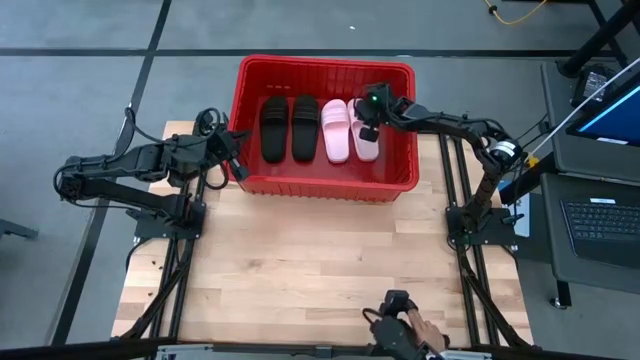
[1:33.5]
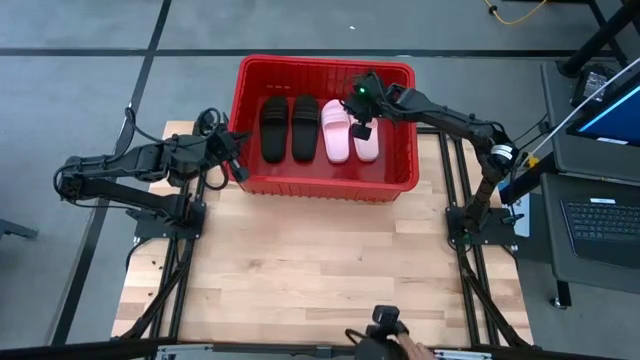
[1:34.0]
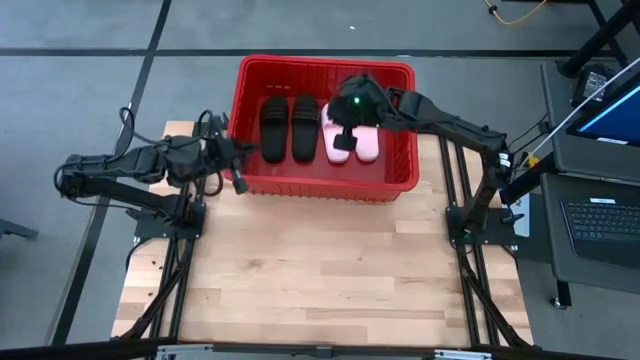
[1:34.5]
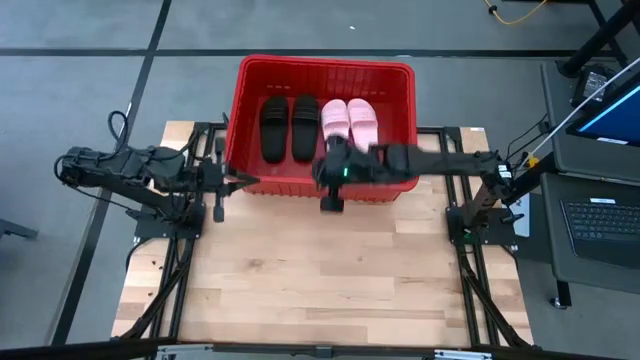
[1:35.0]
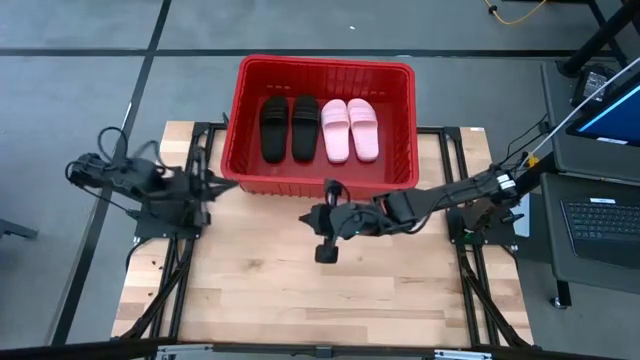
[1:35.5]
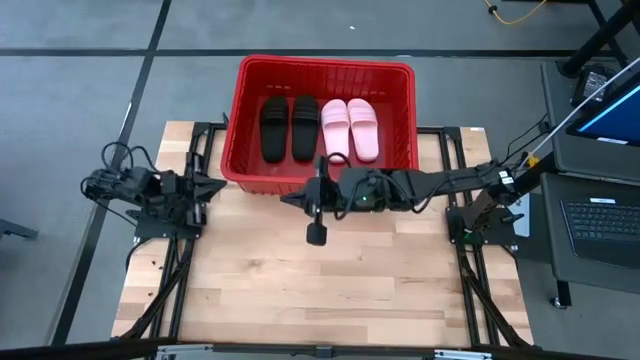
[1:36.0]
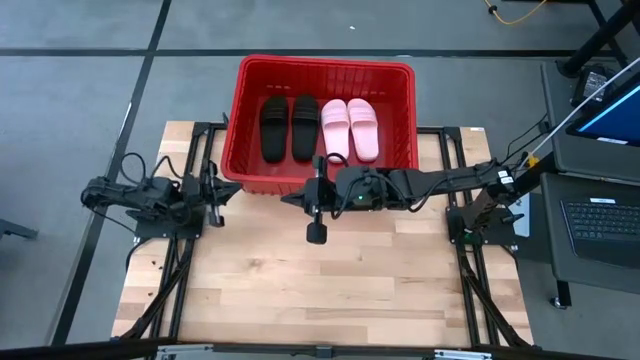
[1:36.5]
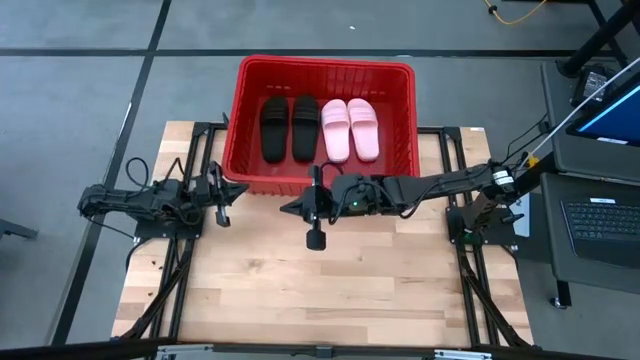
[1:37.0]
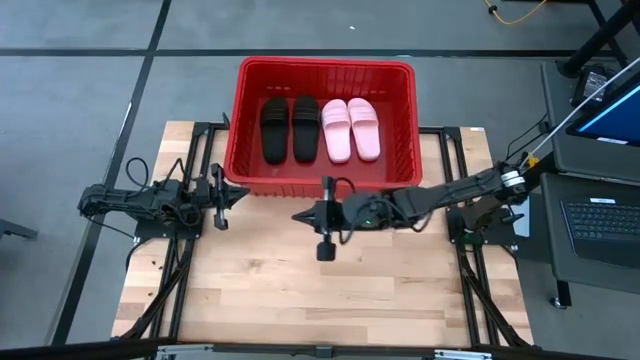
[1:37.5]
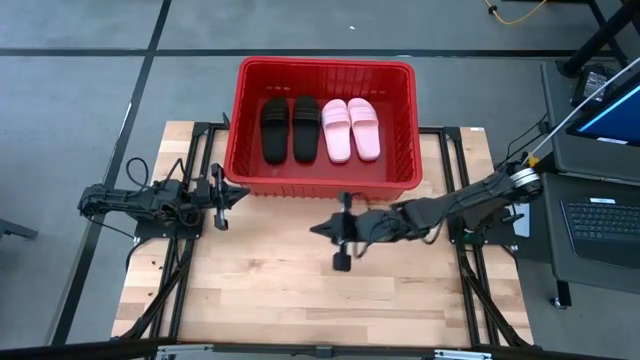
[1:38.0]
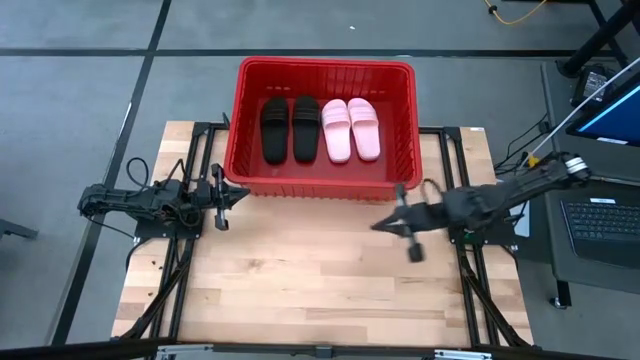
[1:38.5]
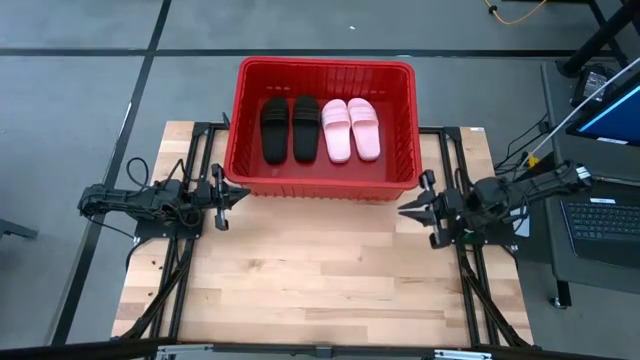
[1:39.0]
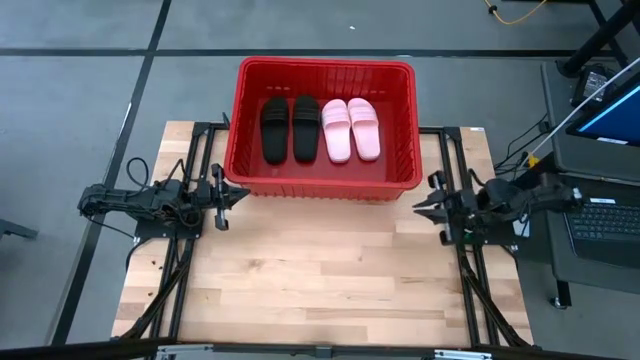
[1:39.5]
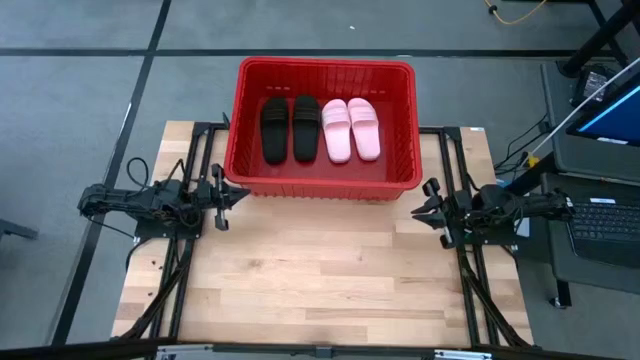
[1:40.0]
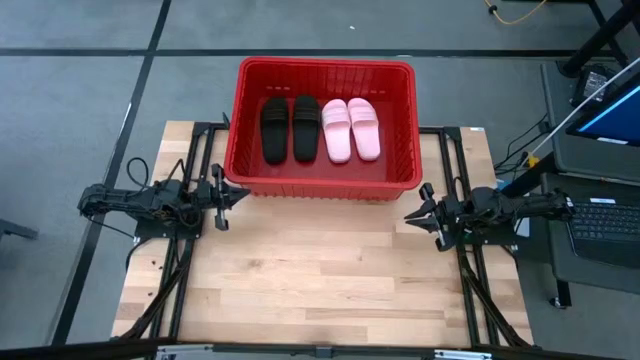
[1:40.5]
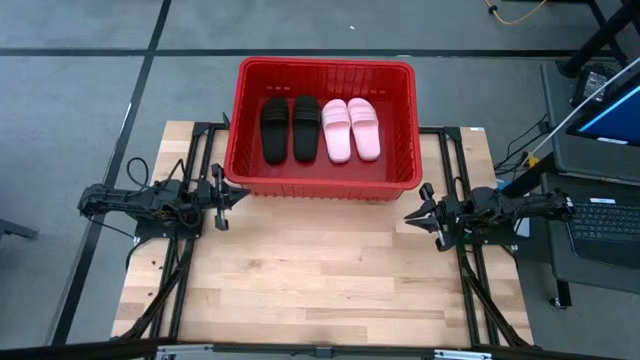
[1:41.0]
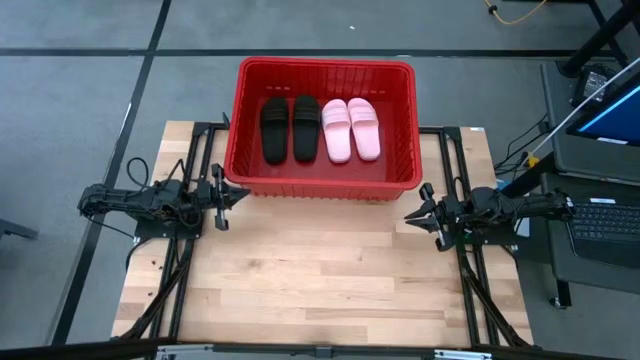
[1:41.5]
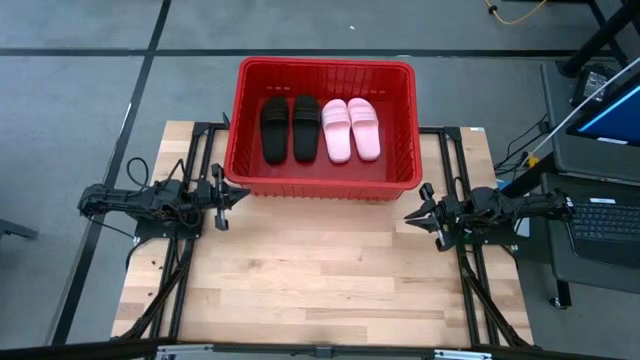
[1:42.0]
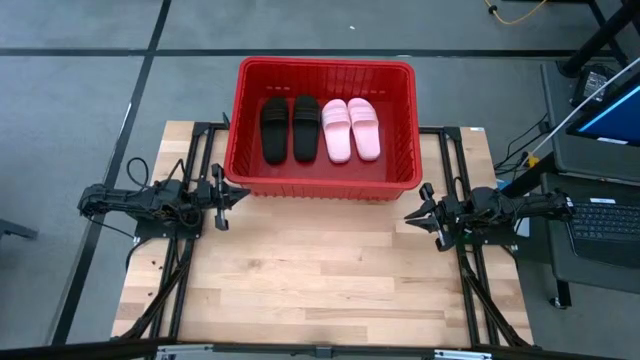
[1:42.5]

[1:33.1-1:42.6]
Task: Pick and place slides into bin
Return to Home Position

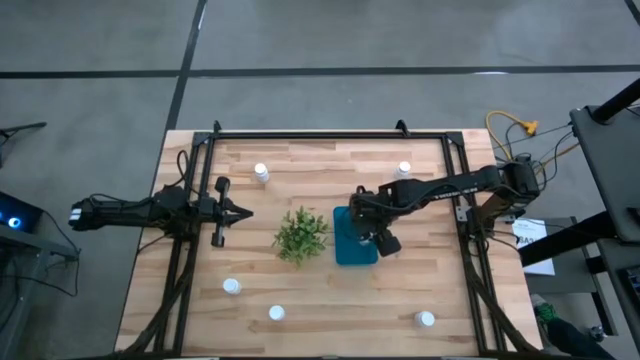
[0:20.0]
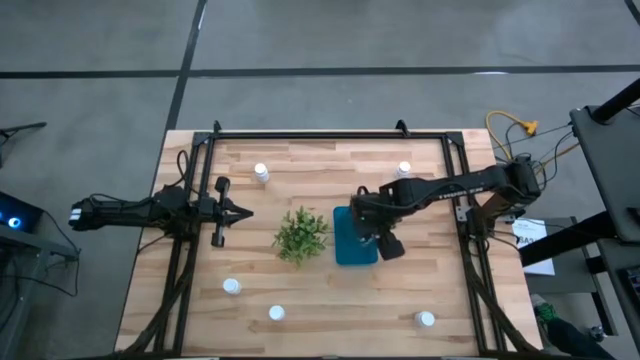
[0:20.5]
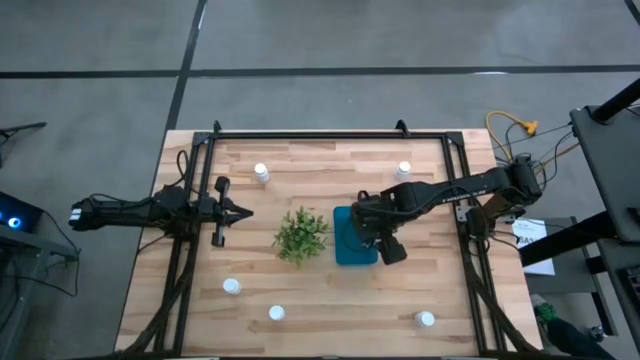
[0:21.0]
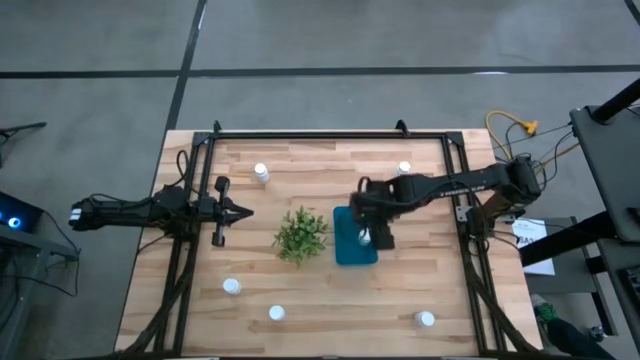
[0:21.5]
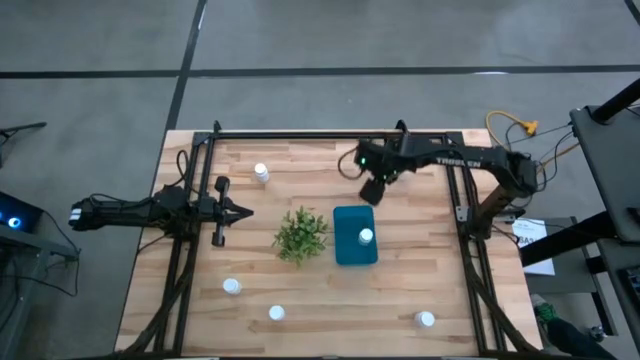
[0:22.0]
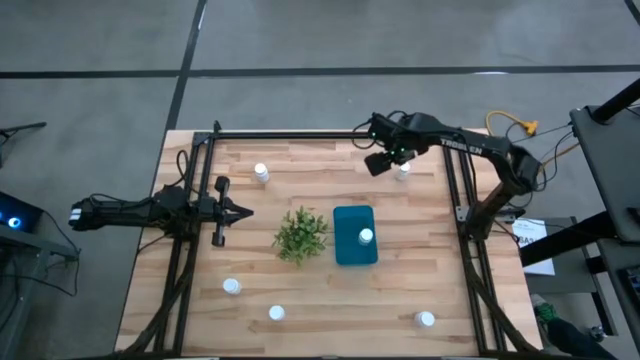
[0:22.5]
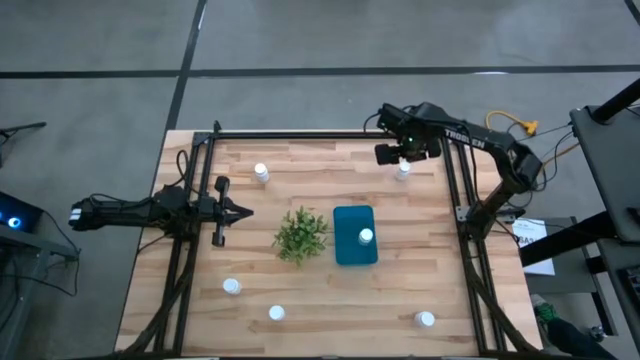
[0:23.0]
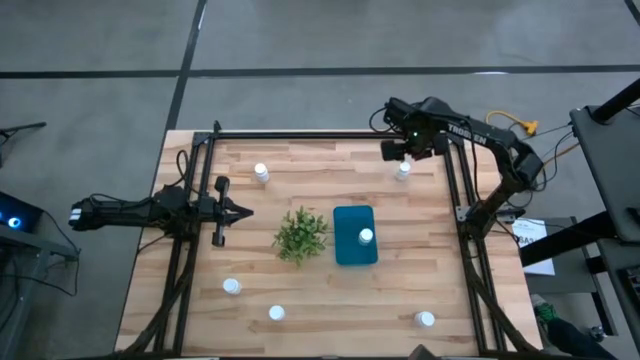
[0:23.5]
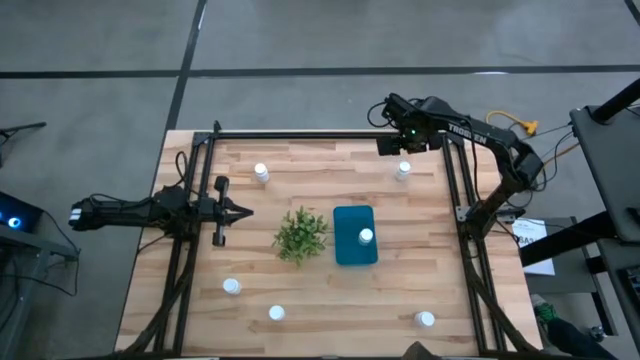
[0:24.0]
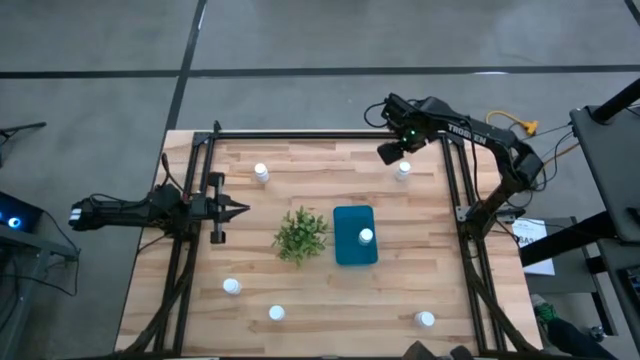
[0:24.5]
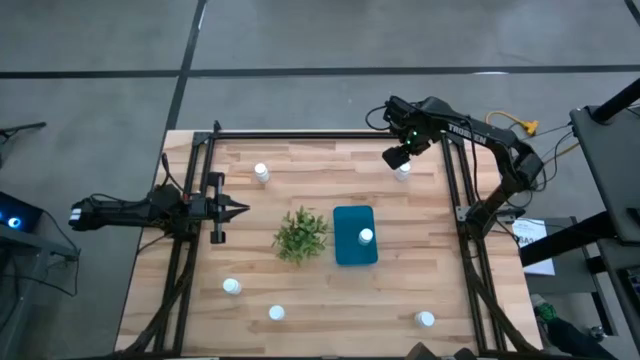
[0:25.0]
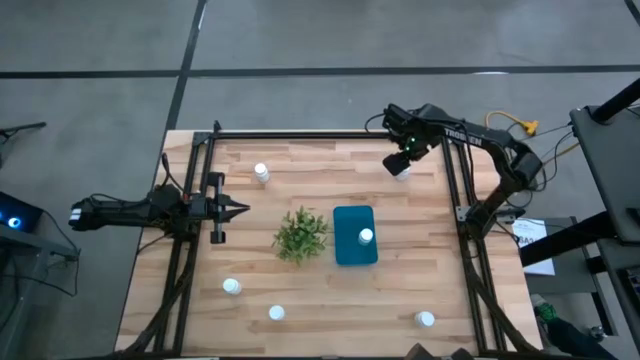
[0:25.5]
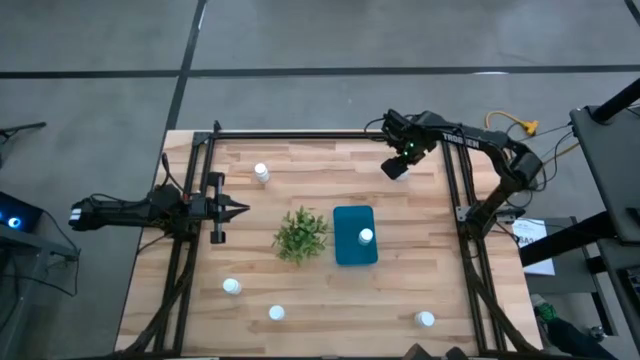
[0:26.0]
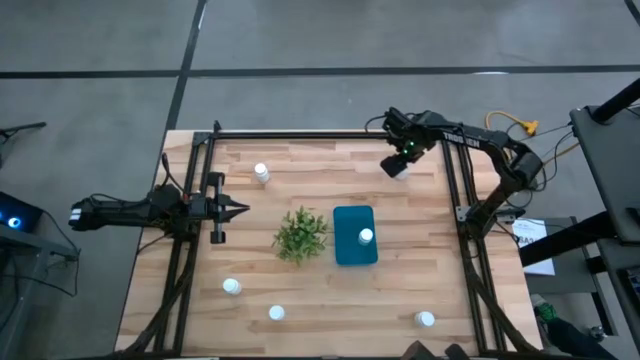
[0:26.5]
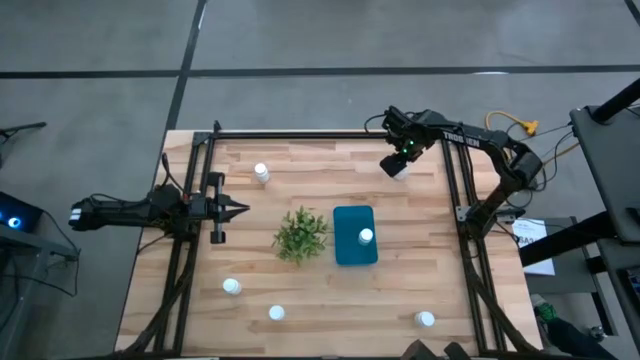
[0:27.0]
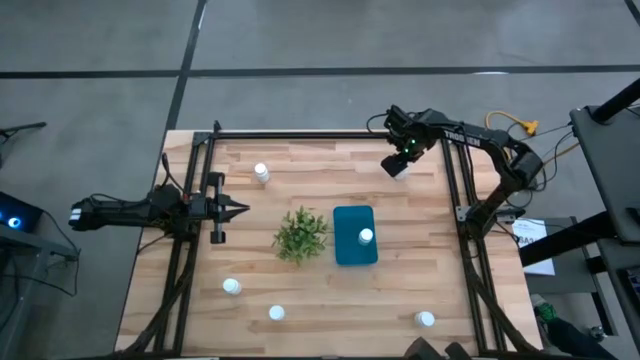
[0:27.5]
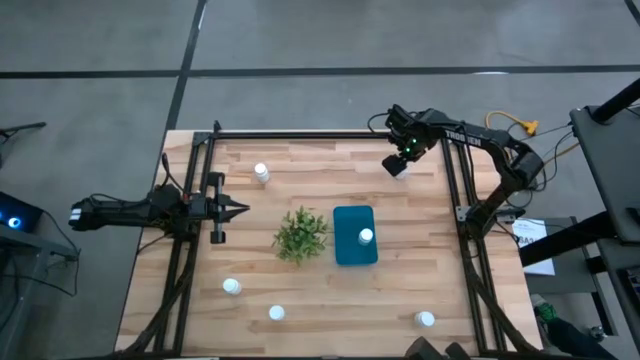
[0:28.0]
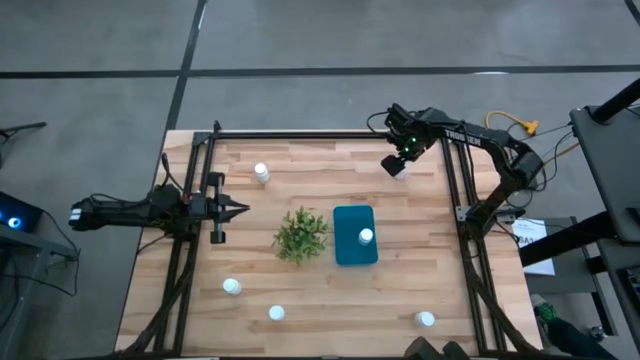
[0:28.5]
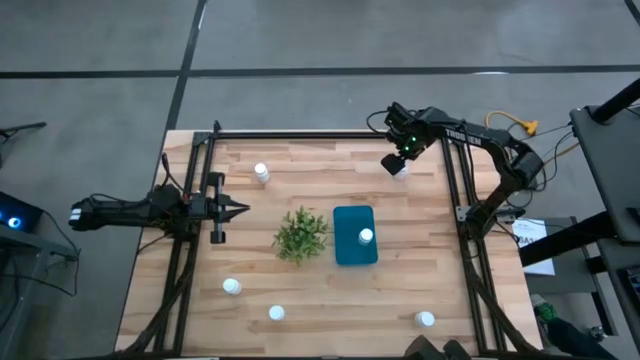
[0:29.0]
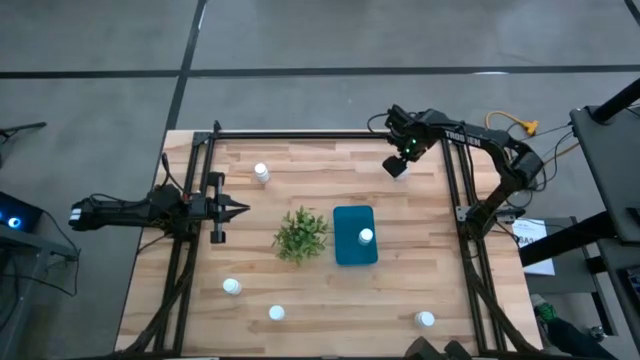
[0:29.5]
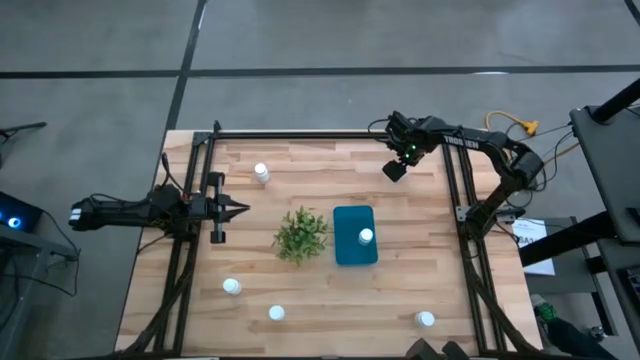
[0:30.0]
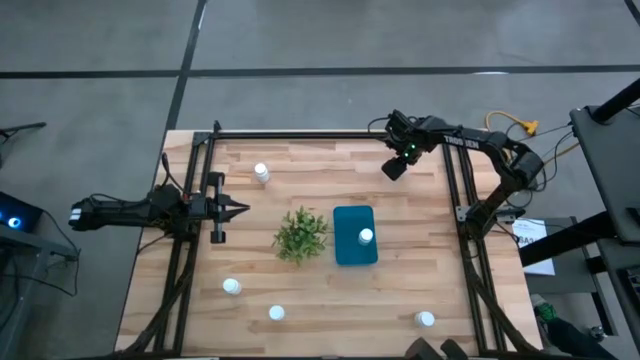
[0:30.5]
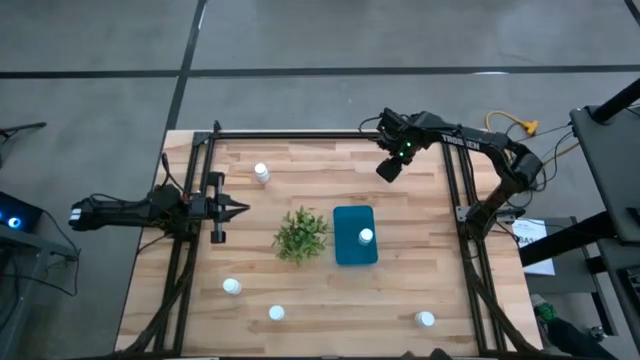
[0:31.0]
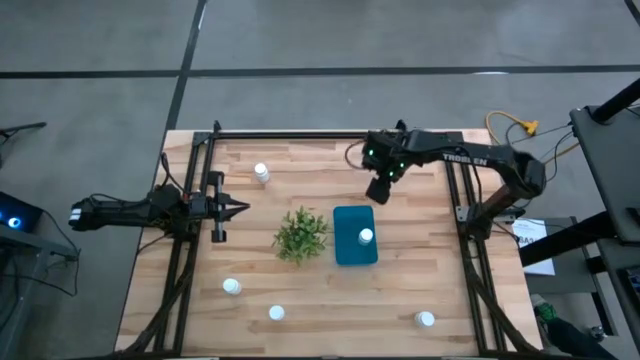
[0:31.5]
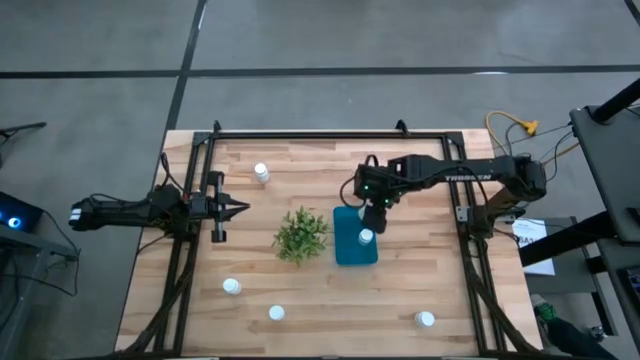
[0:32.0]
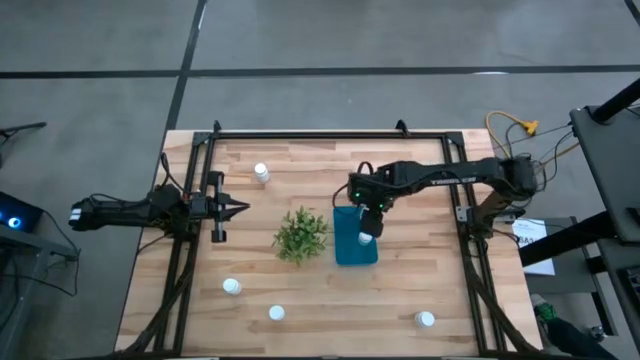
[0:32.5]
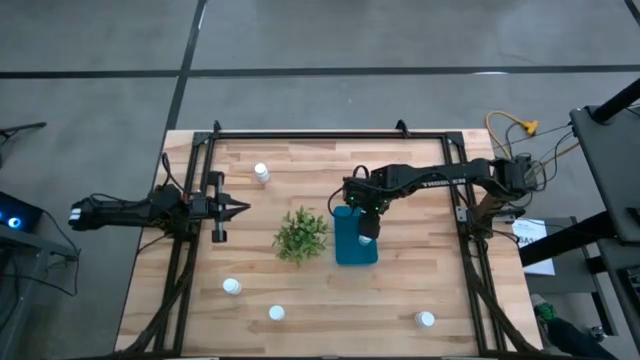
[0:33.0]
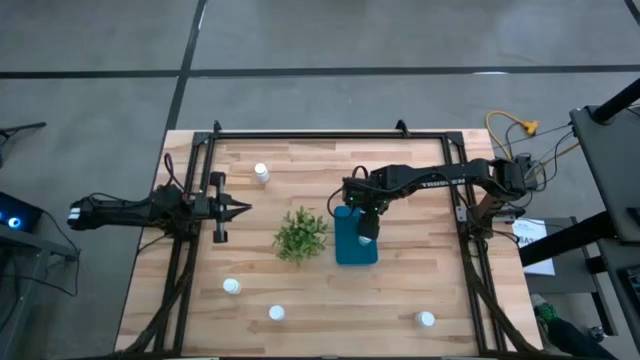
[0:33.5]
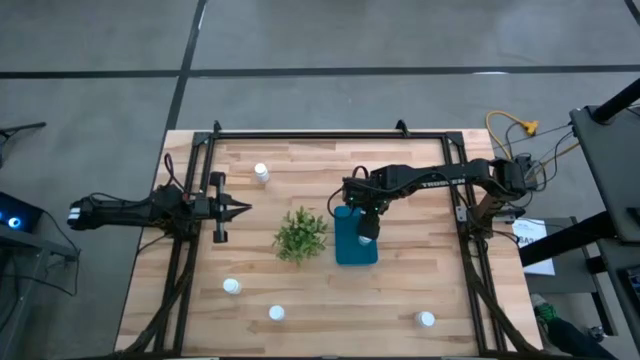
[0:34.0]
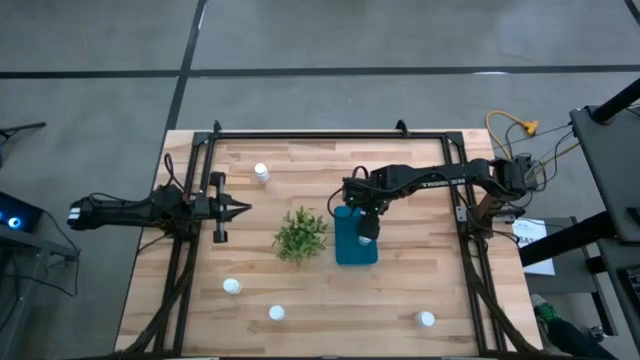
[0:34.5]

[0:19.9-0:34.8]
Task: Pick and place pill bottles into a basket
Put the white medicine bottle into the blue bin
